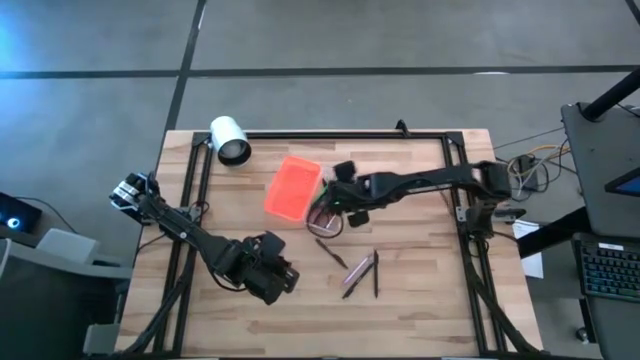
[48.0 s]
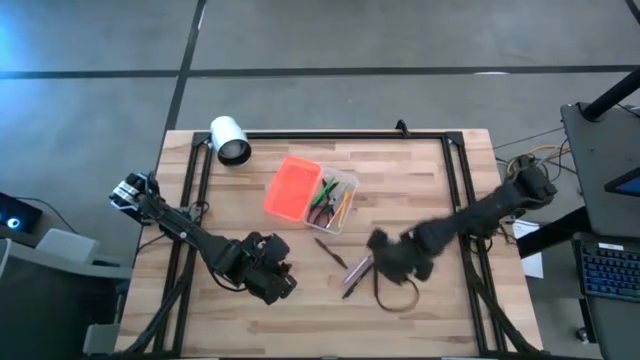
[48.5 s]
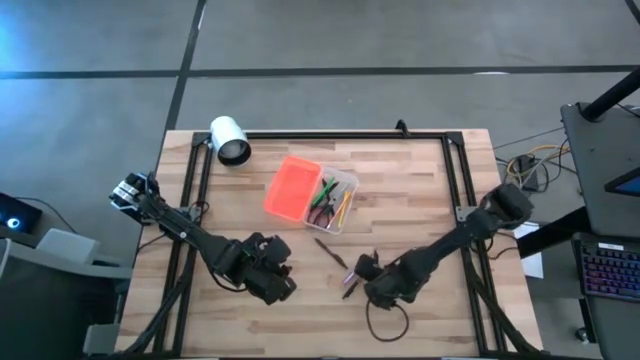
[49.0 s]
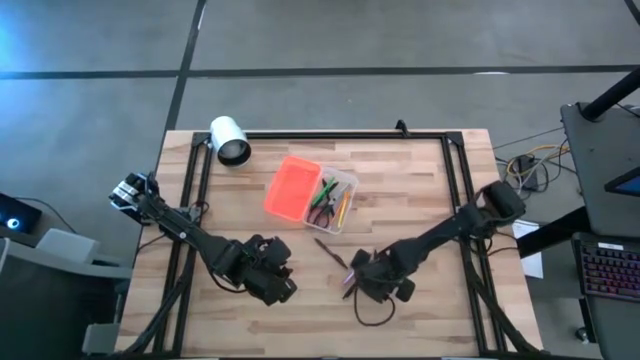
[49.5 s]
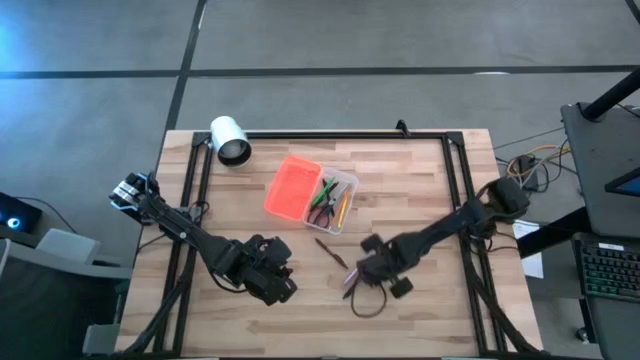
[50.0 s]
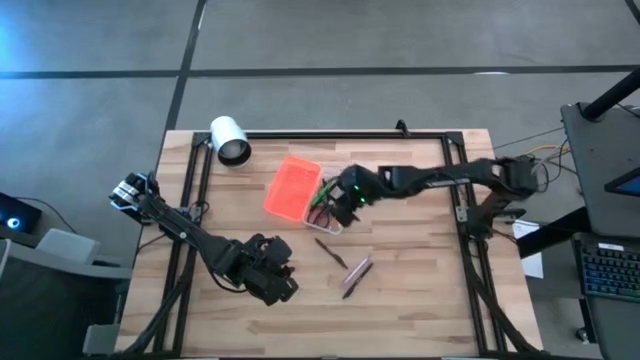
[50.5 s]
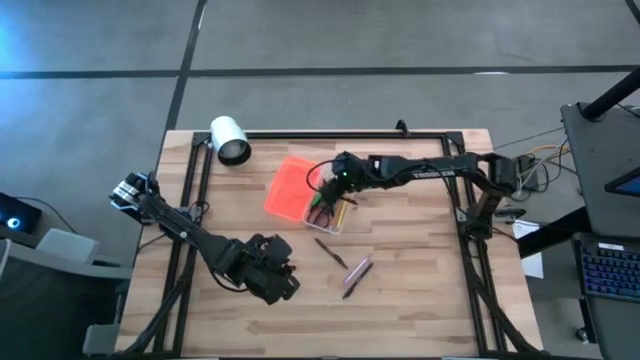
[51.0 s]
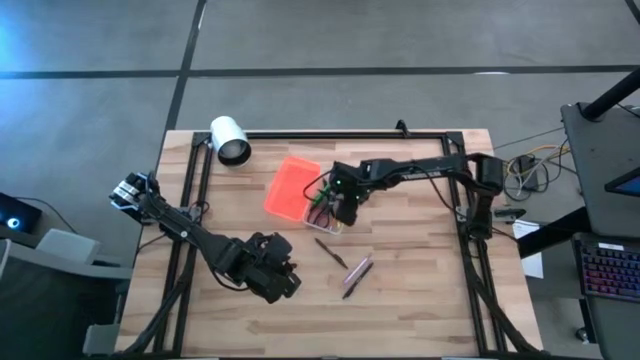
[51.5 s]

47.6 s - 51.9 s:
Task: Pick & place school supplies into a supply box
Put the black pen into the orange supply box

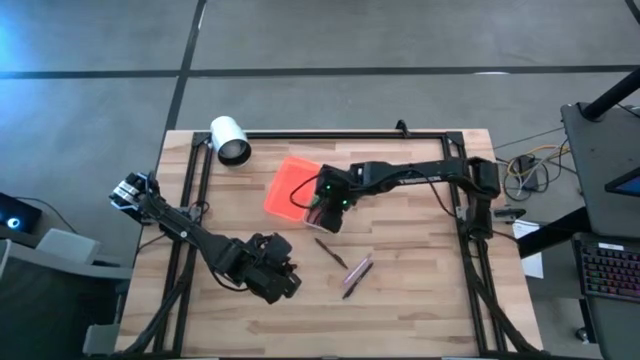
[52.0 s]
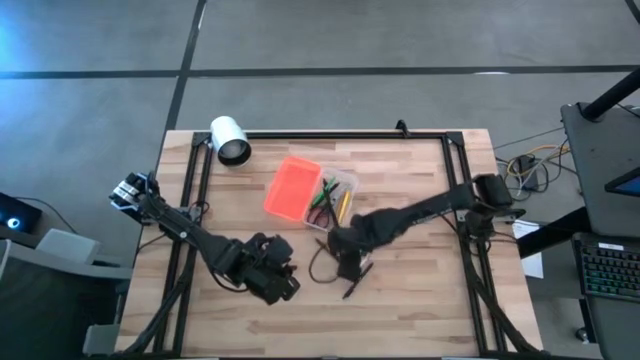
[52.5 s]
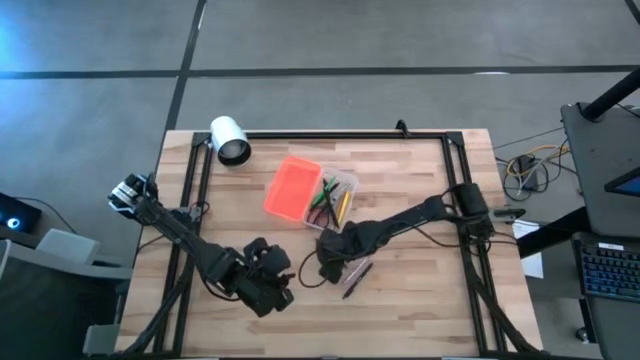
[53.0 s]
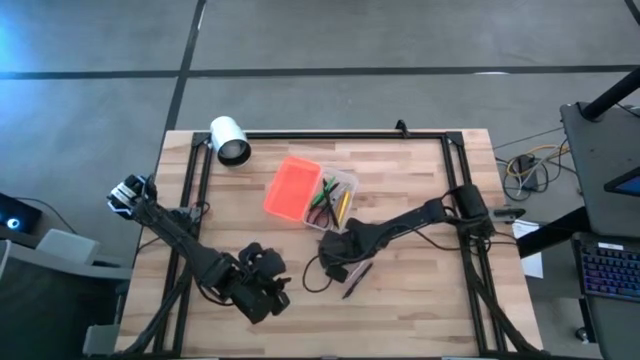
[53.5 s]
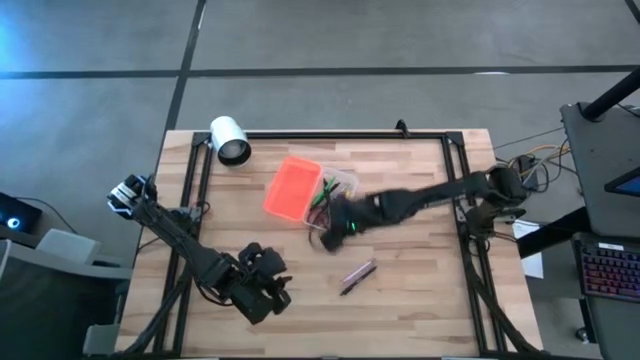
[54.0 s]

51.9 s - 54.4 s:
Put the brown pen into the orange supply box

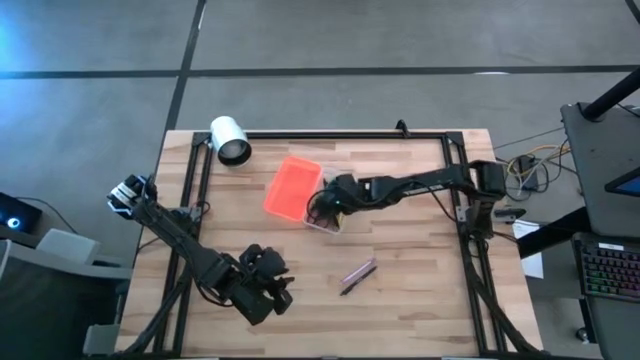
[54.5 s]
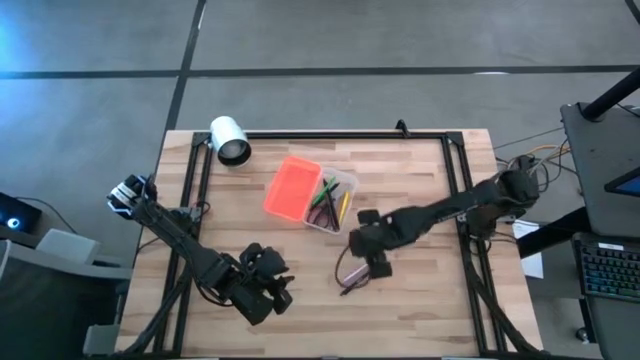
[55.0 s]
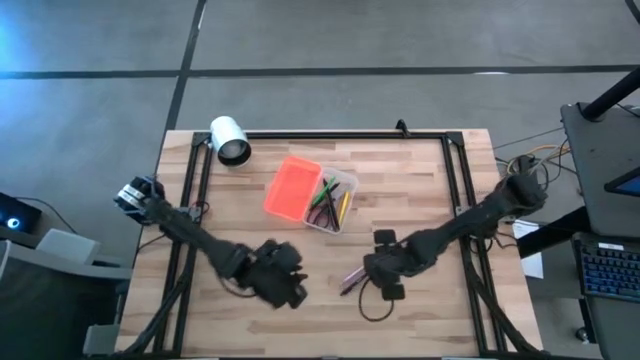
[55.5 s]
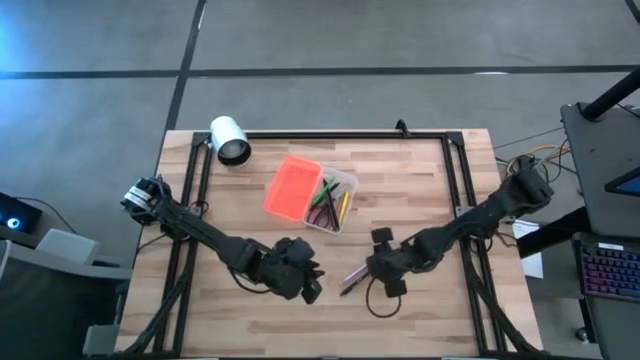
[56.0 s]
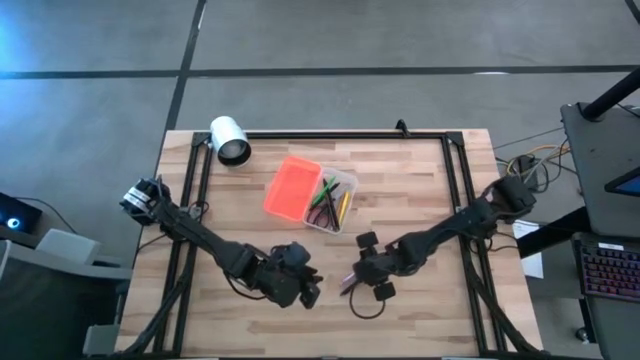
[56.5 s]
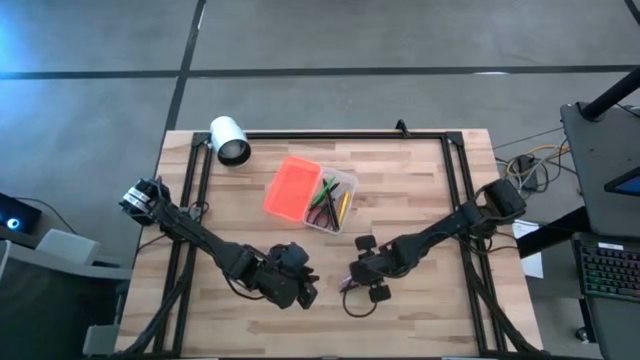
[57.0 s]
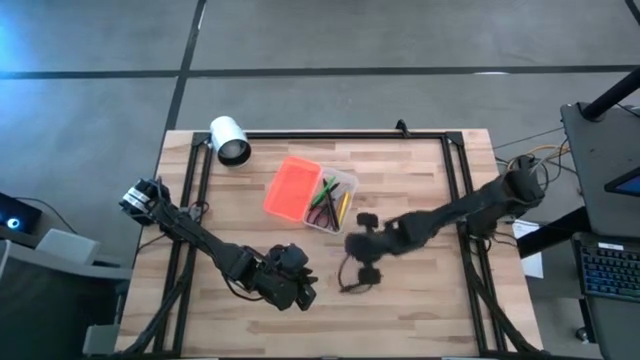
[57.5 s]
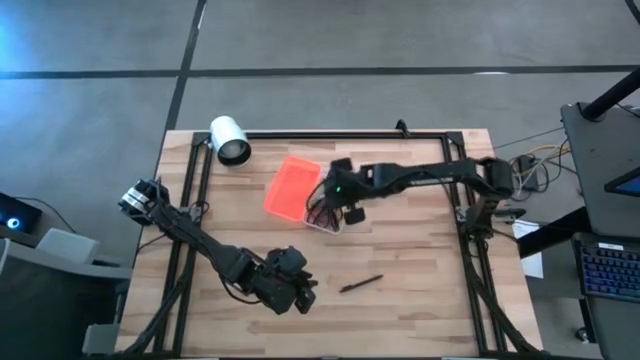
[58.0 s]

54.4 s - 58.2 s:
Put the purple pen into the orange supply box

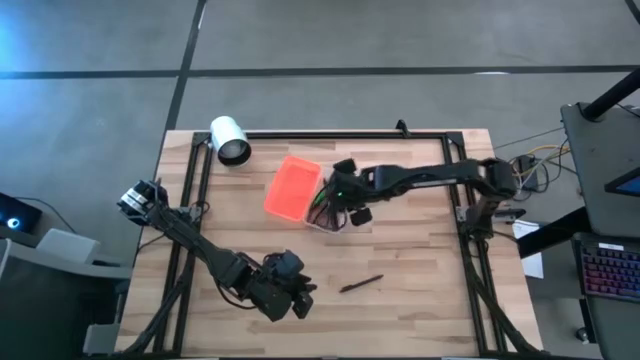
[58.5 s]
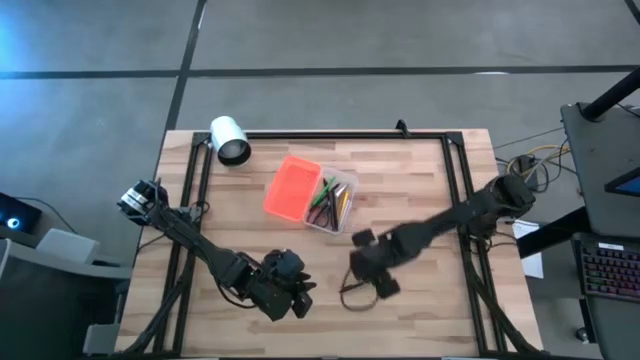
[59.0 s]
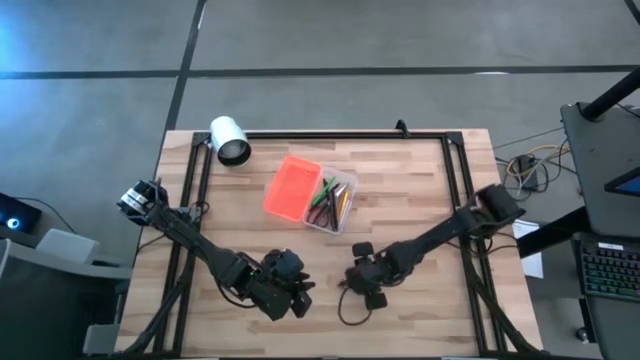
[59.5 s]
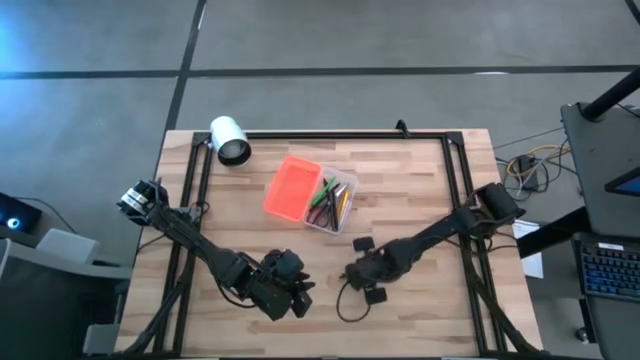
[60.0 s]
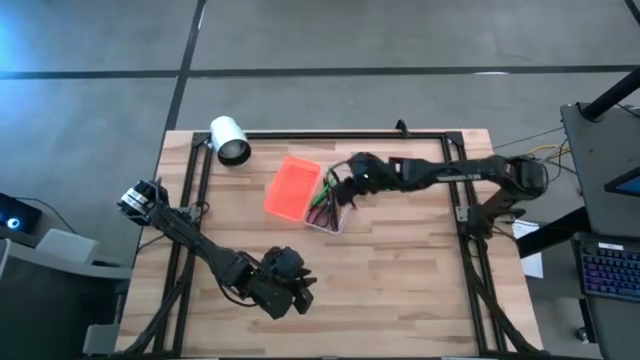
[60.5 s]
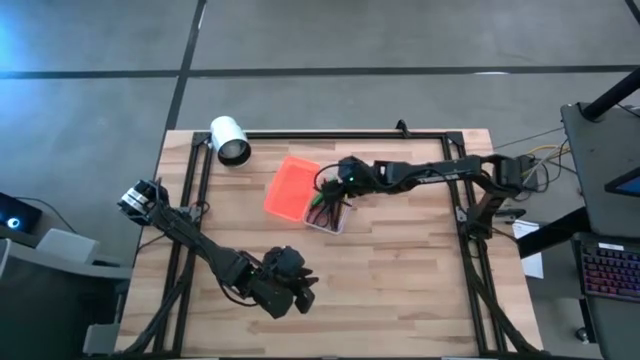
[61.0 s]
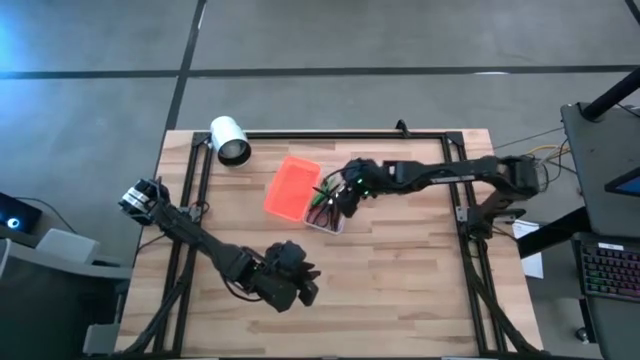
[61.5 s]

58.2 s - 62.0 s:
Put the black pen into the orange supply box

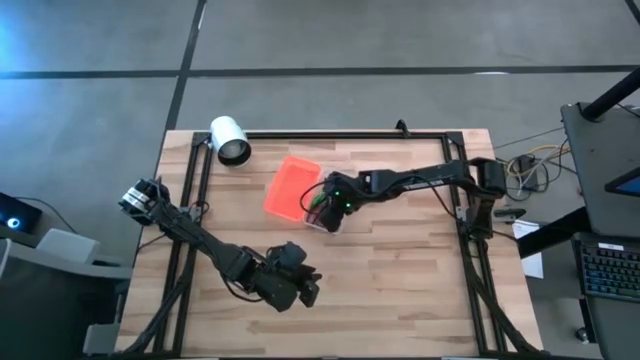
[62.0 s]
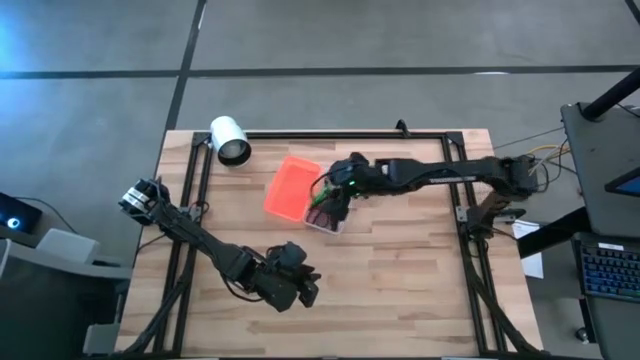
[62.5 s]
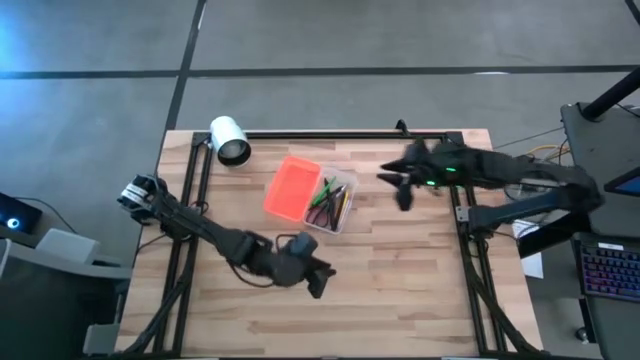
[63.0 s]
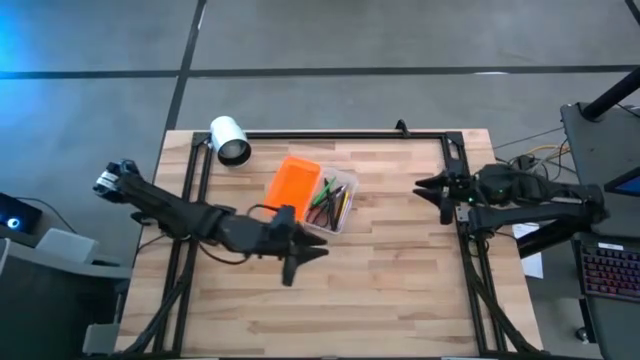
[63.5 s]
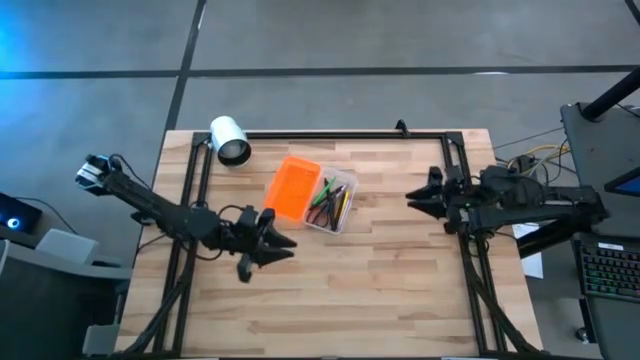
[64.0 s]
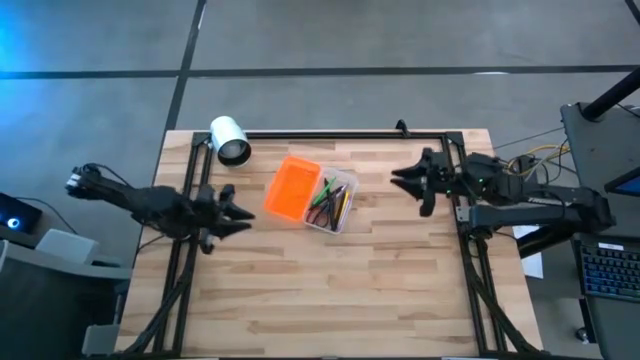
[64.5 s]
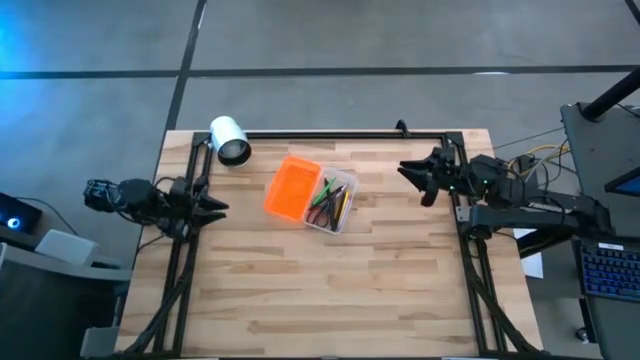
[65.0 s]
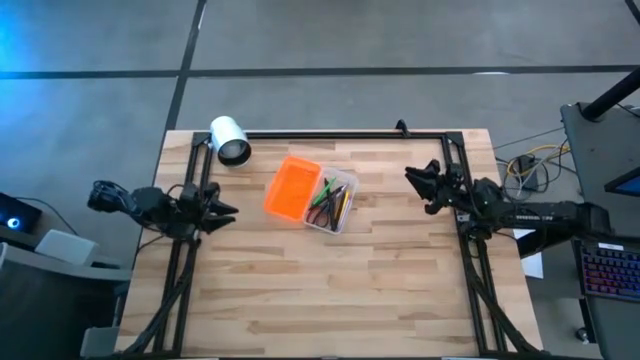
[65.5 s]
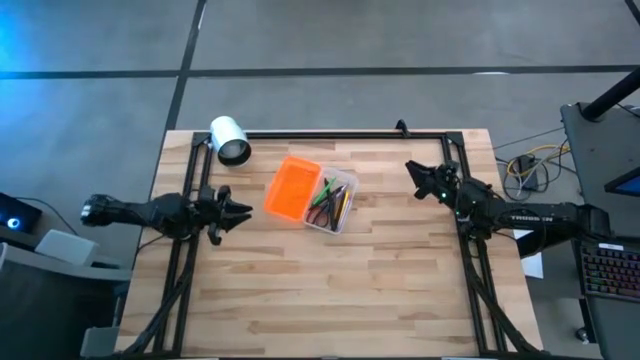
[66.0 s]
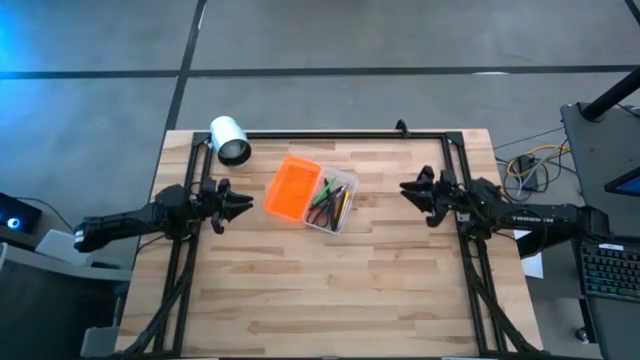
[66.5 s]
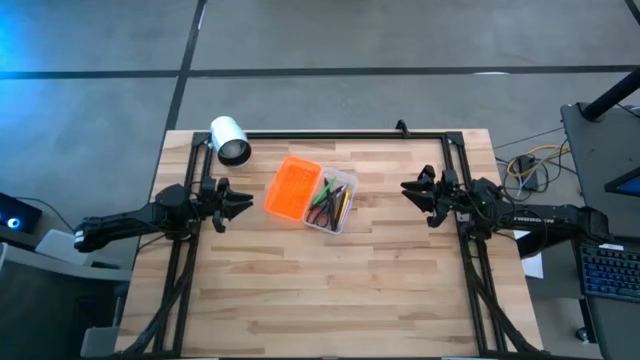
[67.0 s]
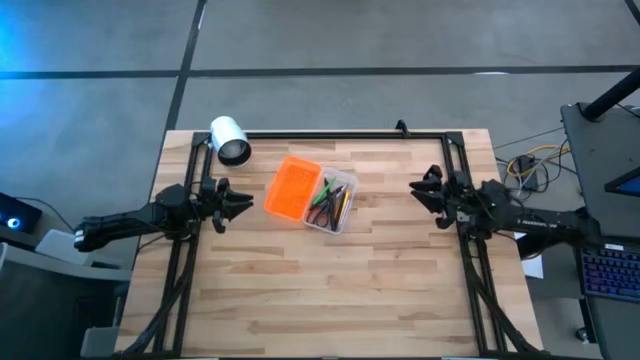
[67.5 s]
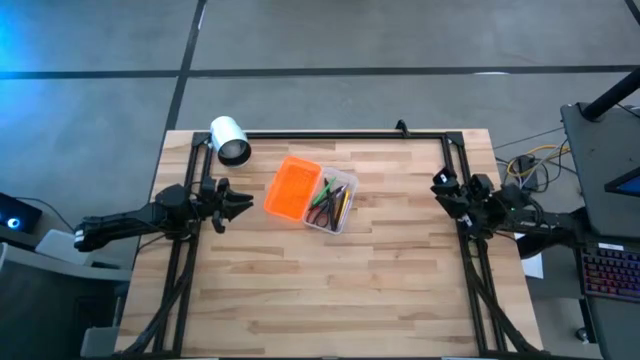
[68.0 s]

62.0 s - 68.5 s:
Return to Home Position
